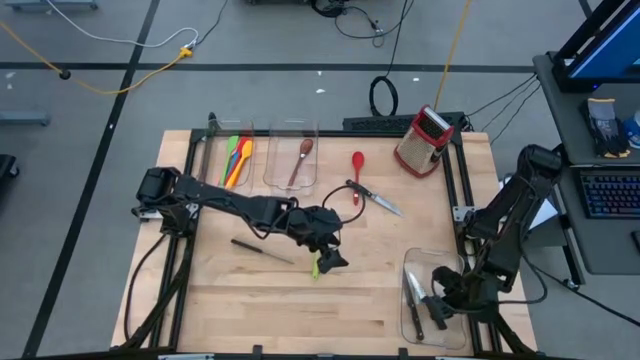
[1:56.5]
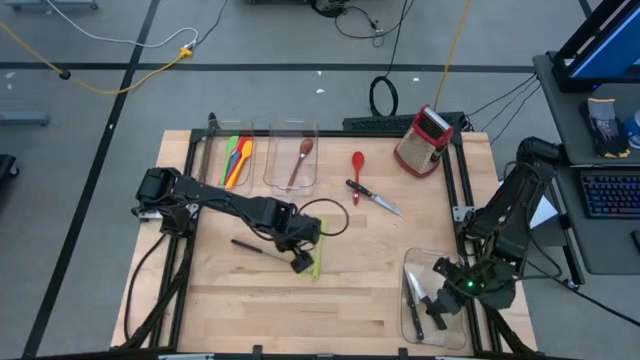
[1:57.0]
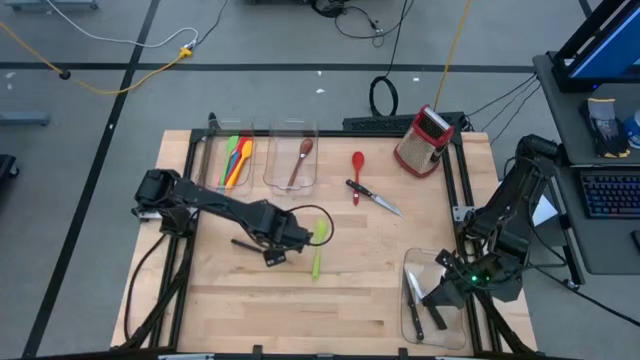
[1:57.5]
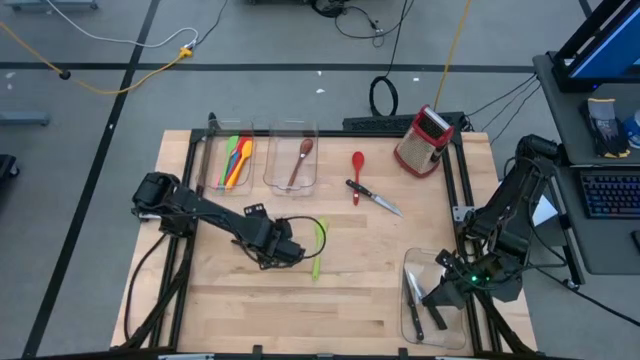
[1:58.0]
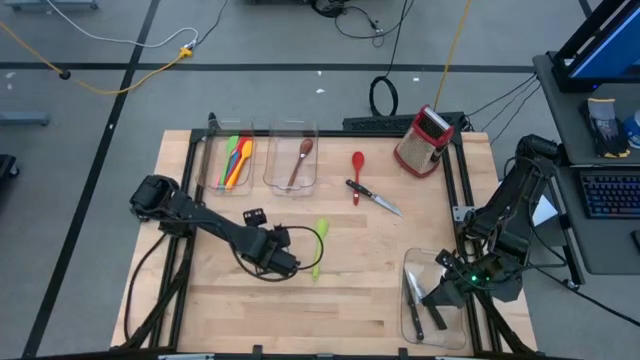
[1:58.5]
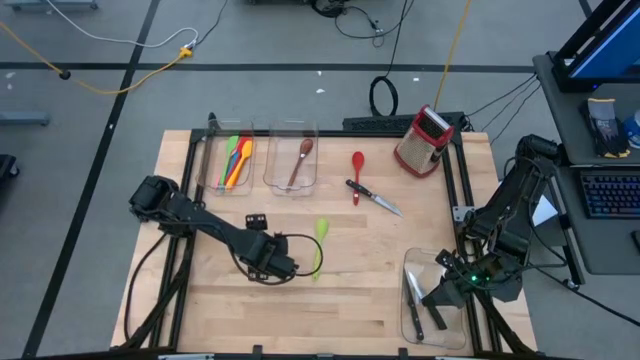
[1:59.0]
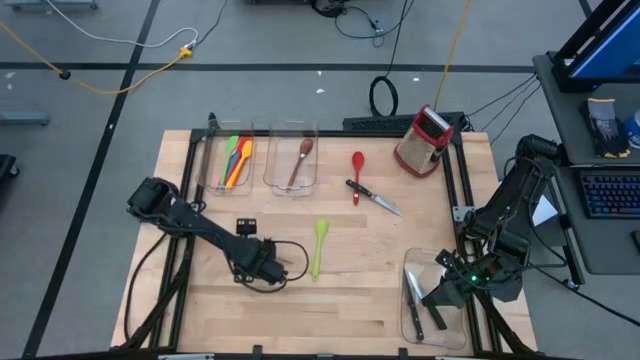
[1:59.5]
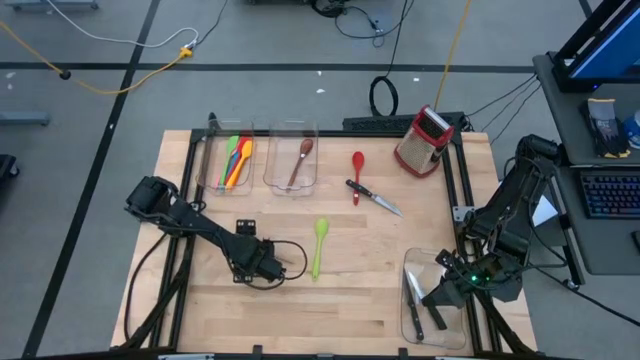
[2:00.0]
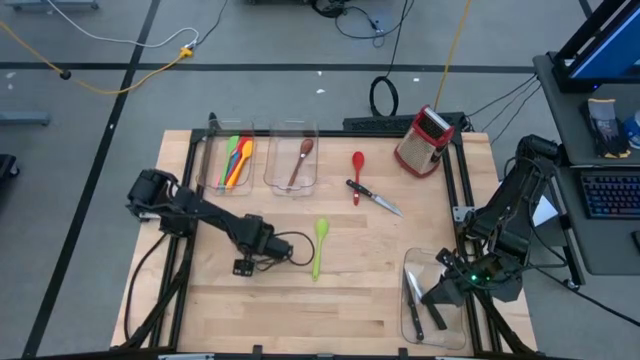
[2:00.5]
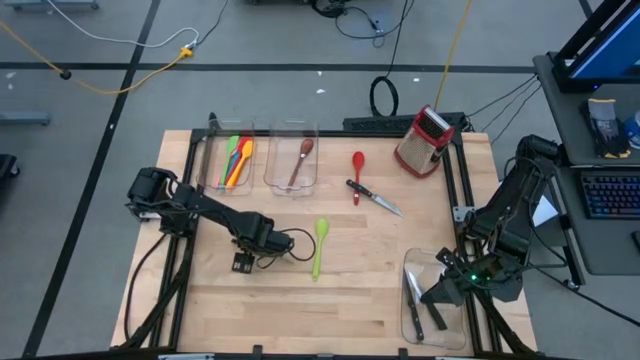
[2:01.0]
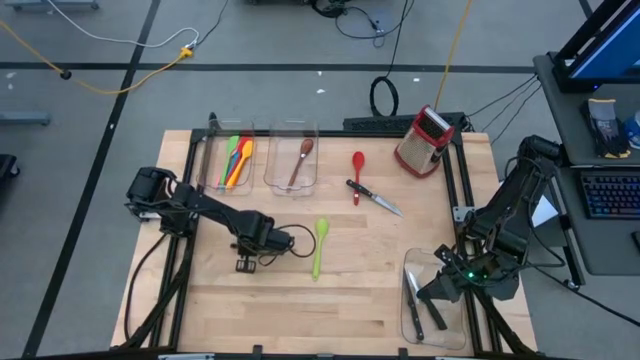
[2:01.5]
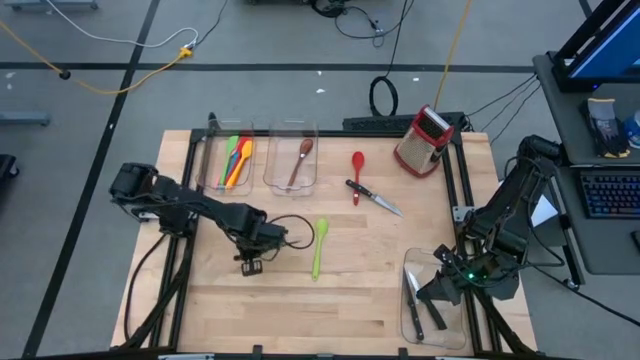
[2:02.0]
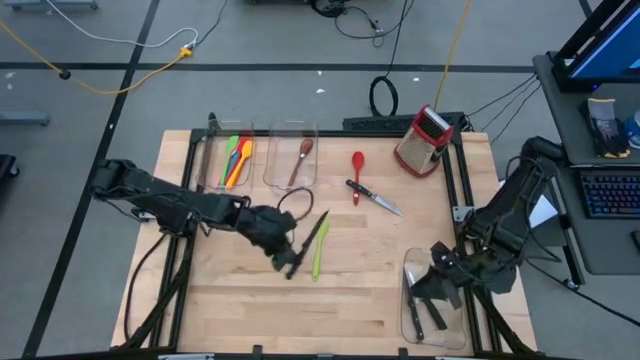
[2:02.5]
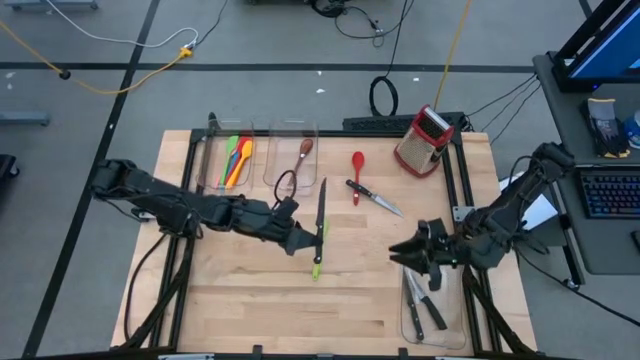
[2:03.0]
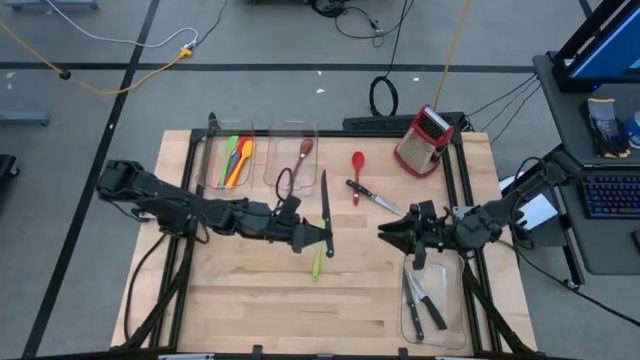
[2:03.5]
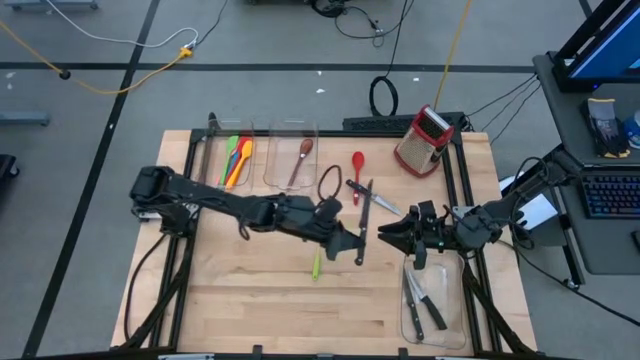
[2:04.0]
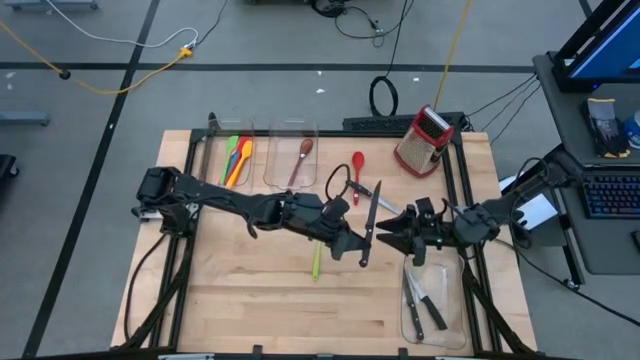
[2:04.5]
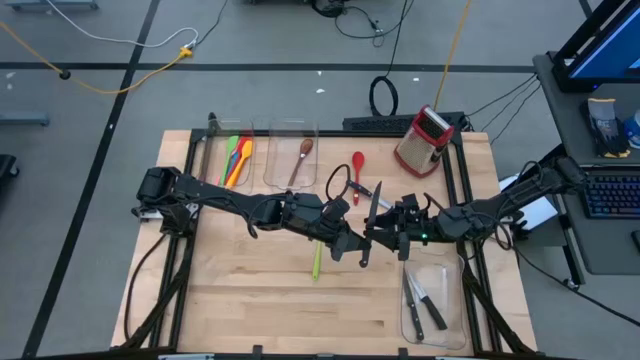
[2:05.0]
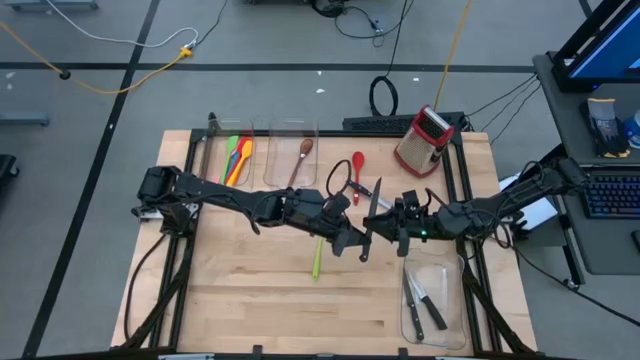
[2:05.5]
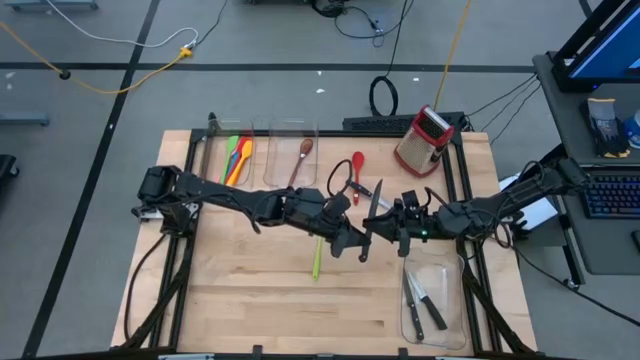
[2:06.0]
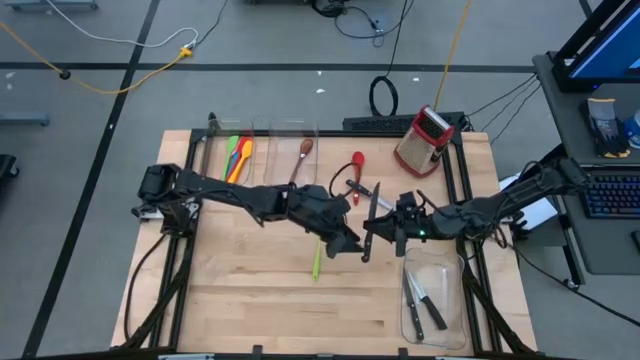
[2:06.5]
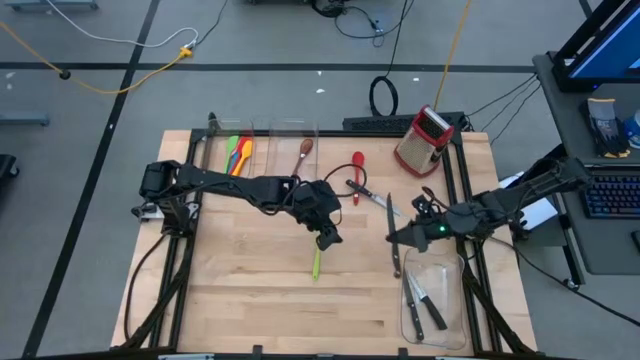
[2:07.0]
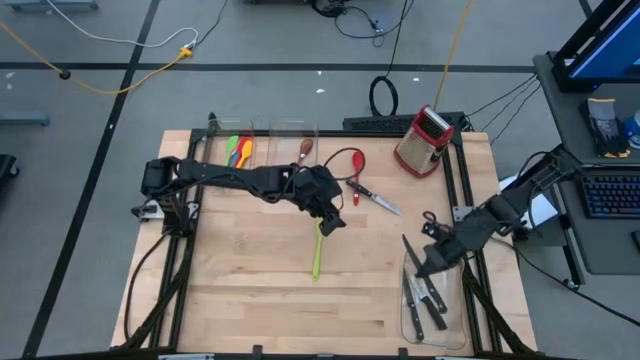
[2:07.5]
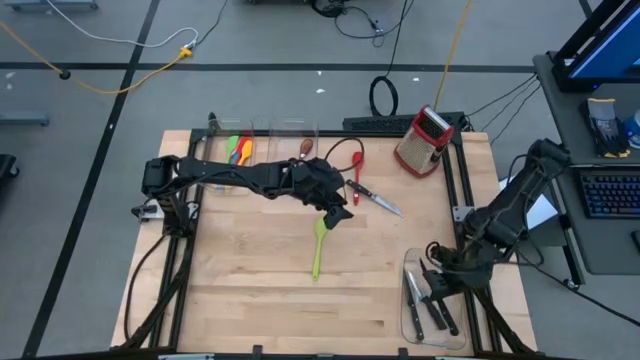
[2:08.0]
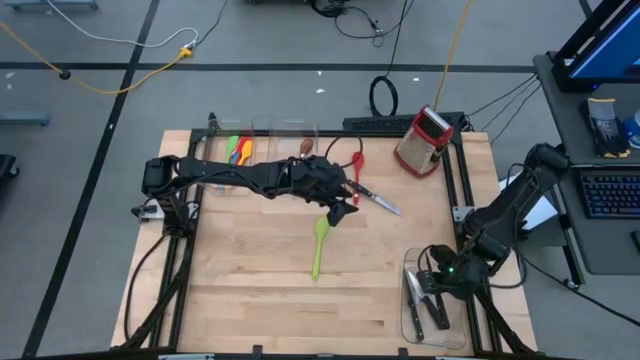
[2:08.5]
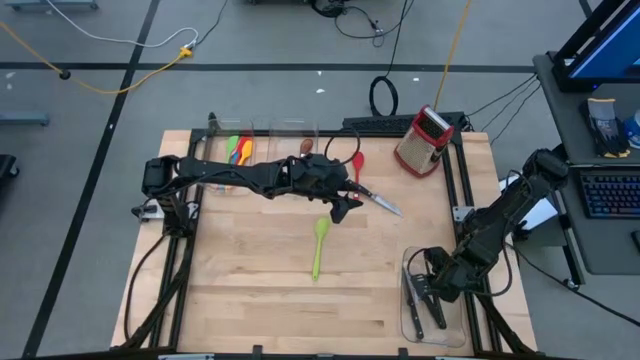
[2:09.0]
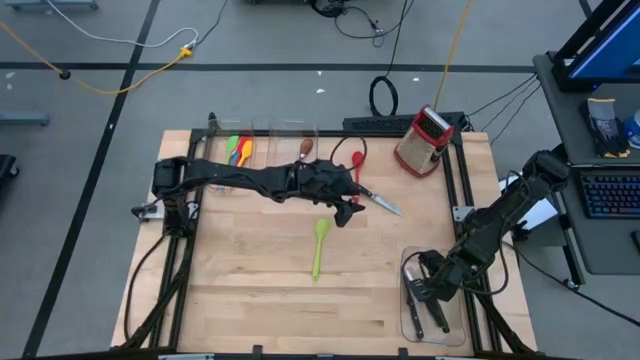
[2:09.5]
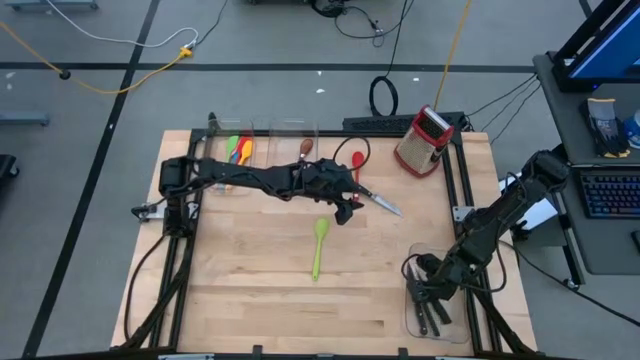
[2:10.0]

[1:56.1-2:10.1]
Task: Pick & Place Kitchen Items
Put the knife into the bottom transparent bin

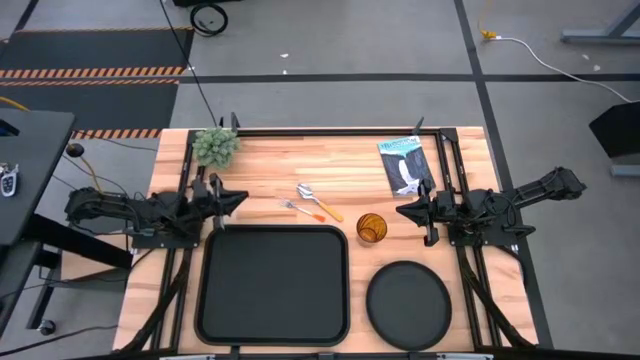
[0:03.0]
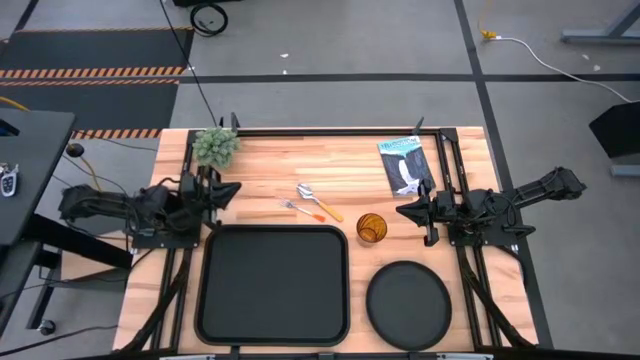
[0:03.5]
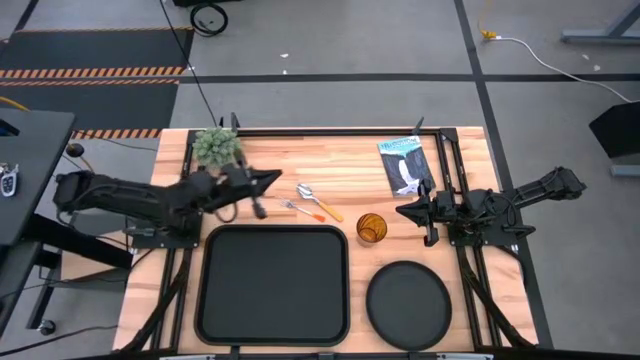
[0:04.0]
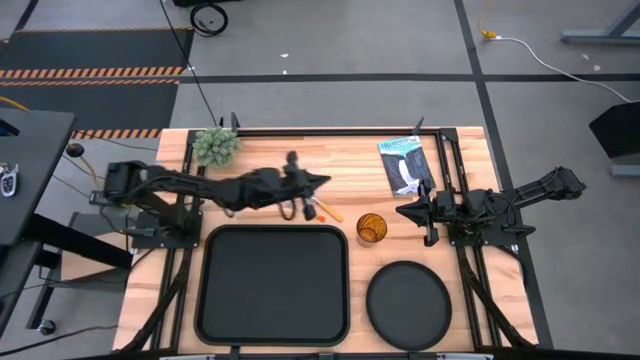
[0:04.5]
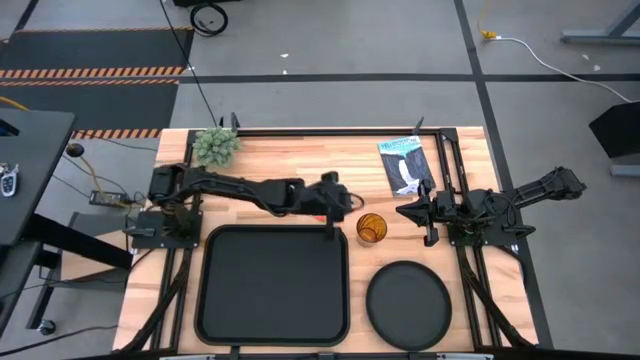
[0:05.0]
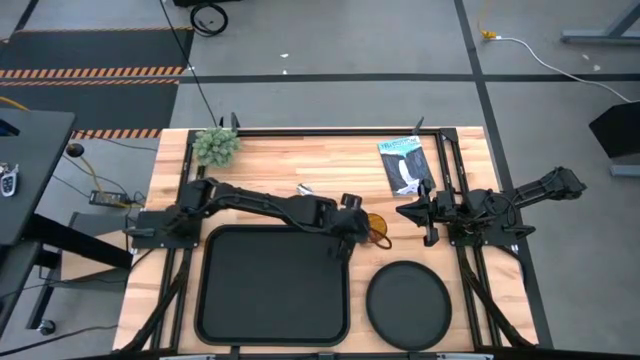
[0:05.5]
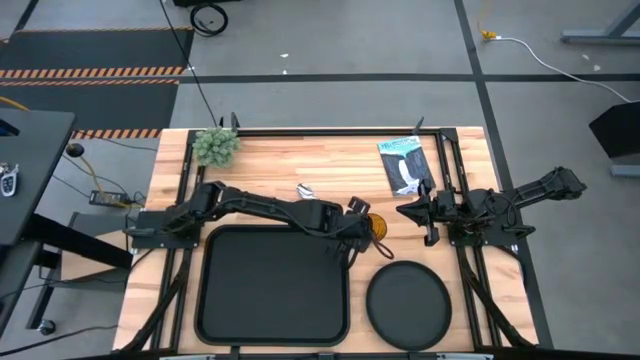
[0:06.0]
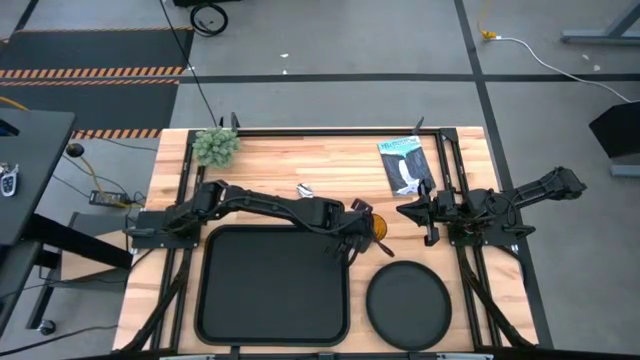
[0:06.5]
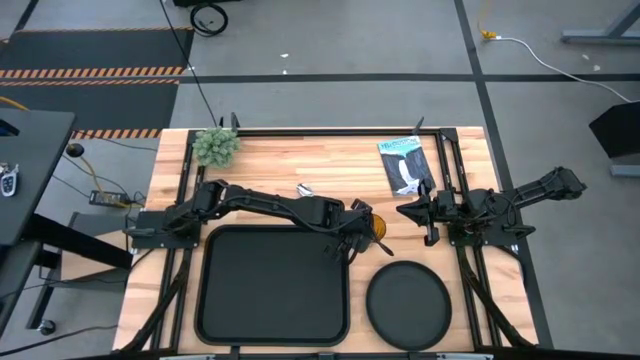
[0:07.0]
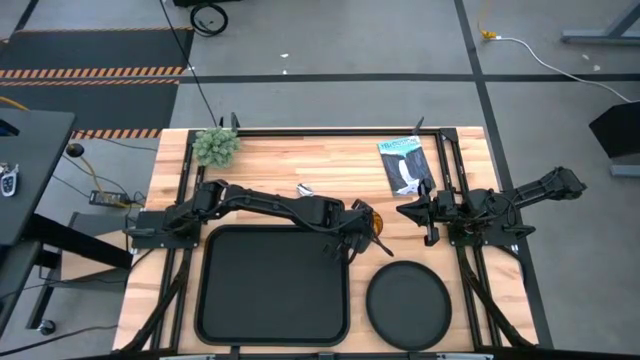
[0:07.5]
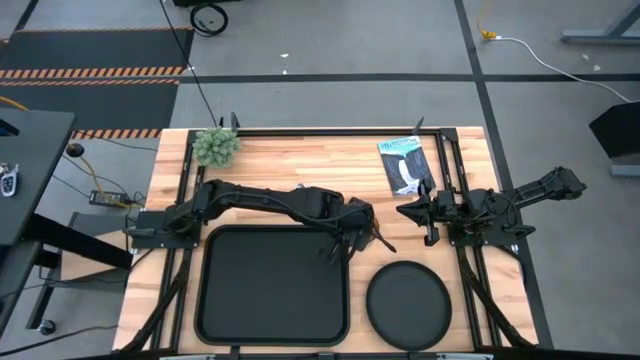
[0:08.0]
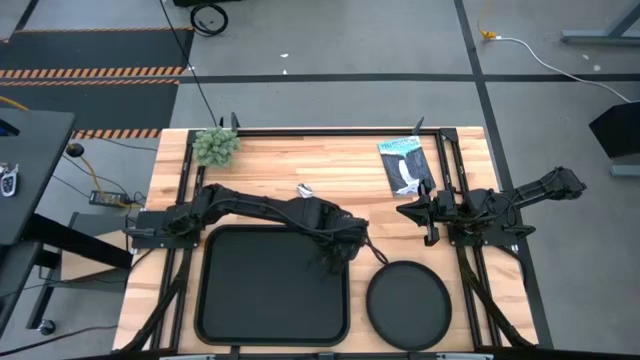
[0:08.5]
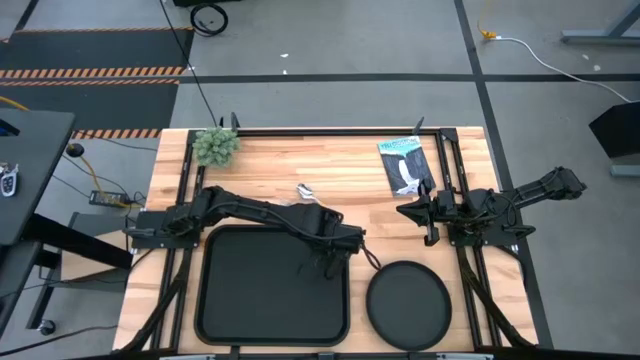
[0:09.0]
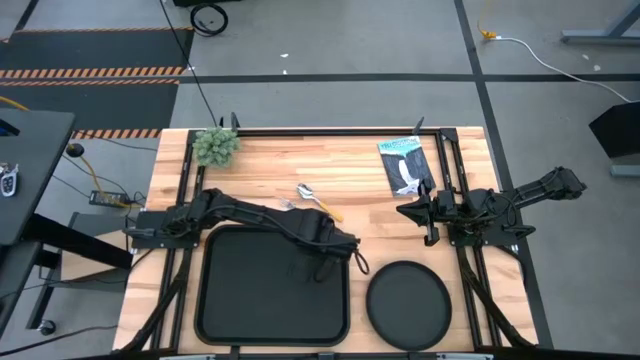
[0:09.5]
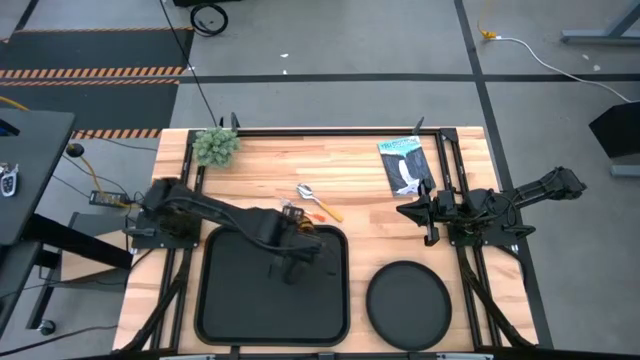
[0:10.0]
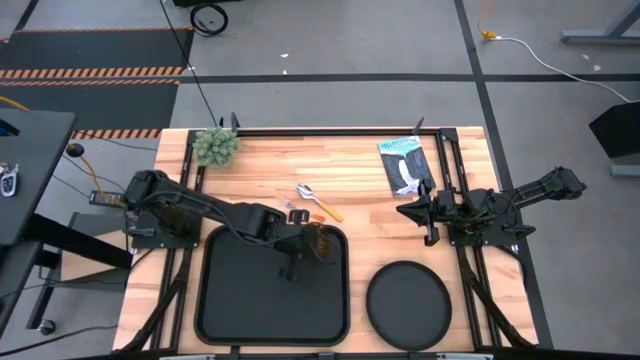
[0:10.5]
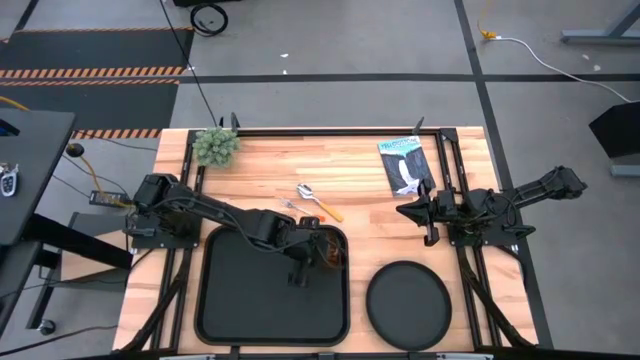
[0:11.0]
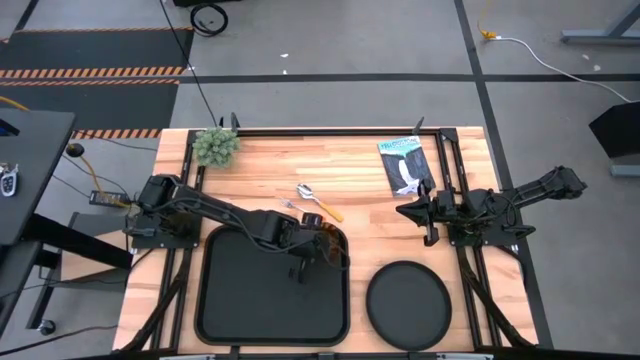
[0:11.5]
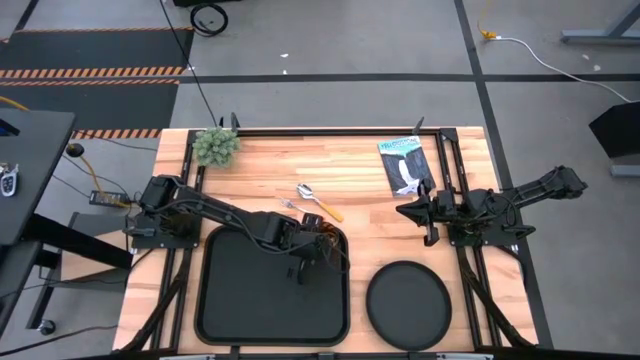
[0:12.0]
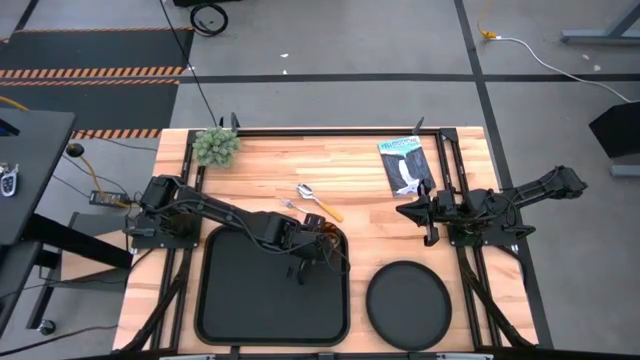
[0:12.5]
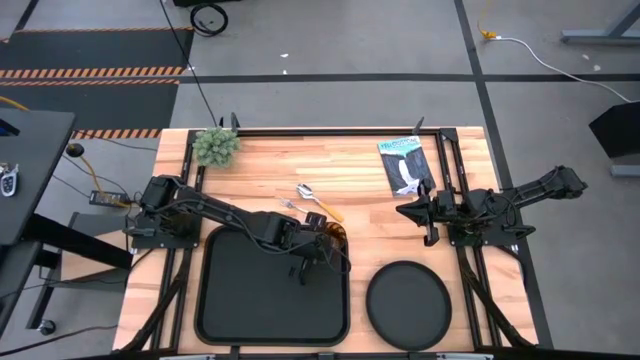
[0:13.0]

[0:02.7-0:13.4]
Task: Pick and place plate/cup/fork/spoon on tray
Put the brown cup on the black tray
